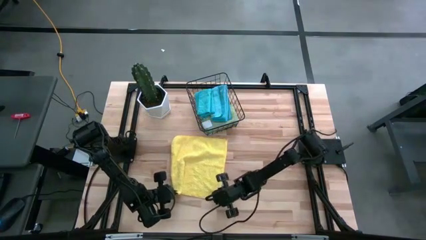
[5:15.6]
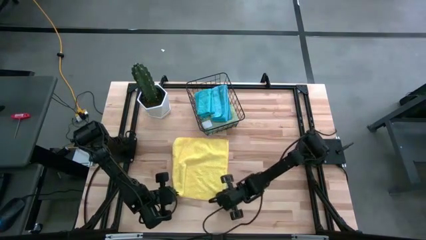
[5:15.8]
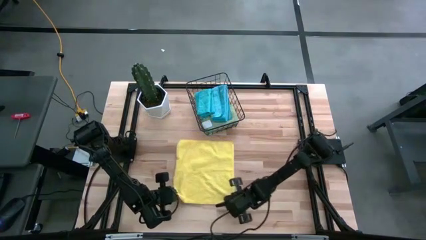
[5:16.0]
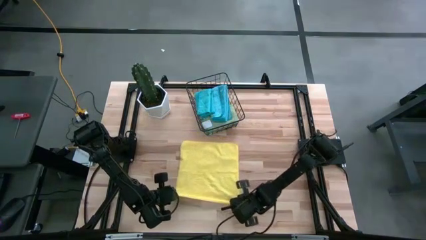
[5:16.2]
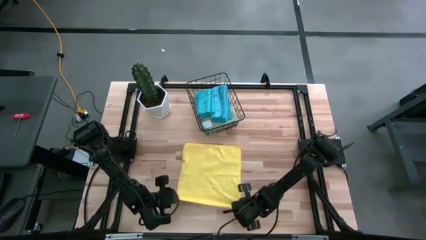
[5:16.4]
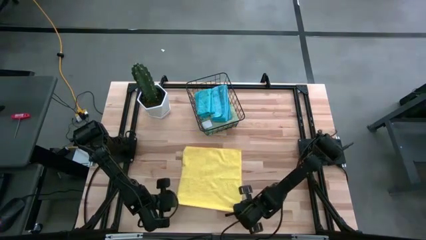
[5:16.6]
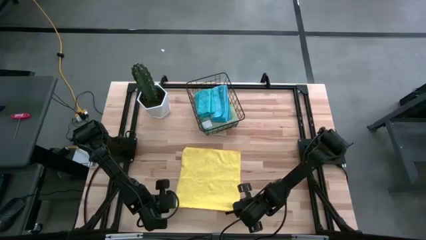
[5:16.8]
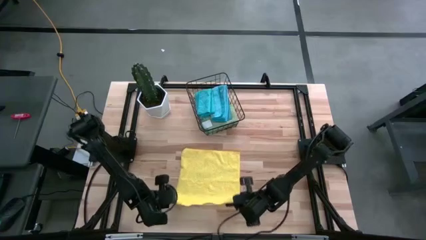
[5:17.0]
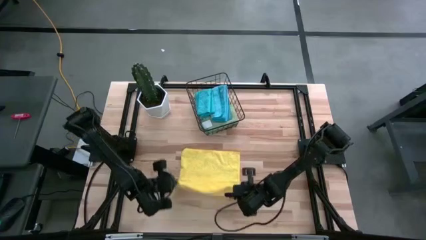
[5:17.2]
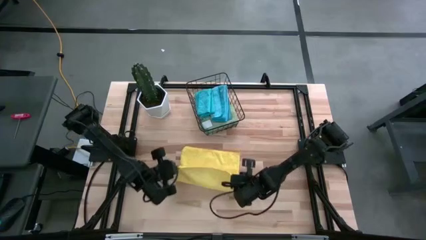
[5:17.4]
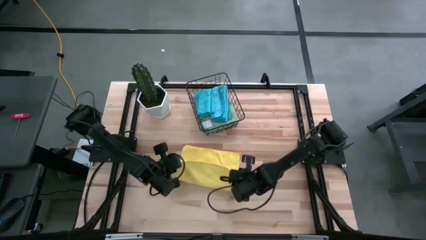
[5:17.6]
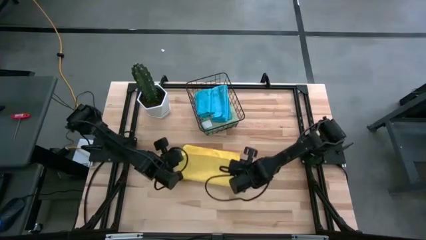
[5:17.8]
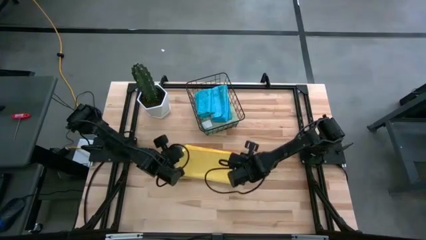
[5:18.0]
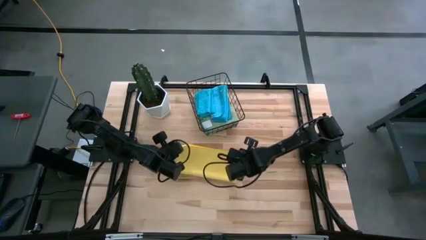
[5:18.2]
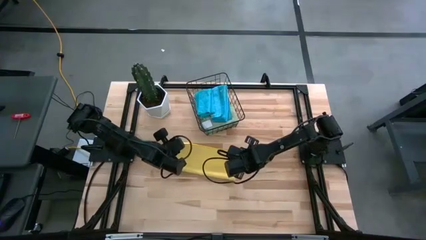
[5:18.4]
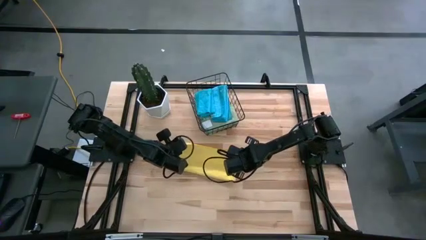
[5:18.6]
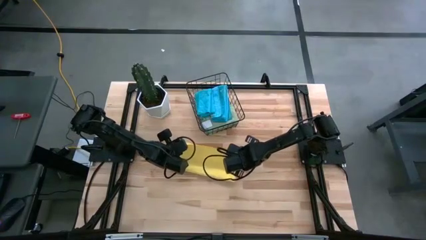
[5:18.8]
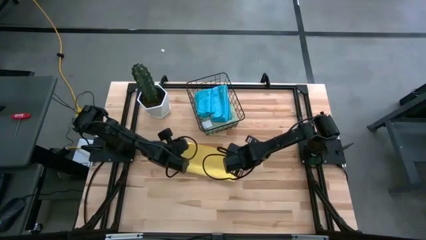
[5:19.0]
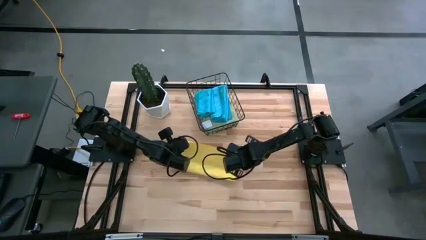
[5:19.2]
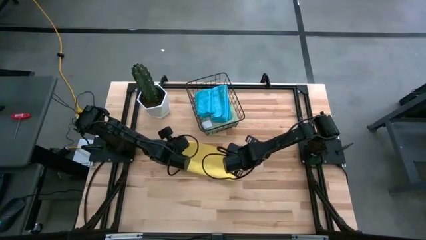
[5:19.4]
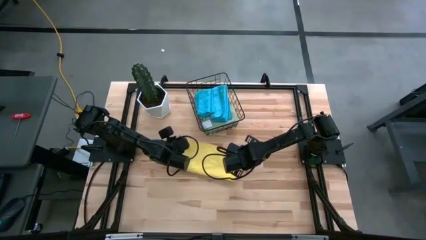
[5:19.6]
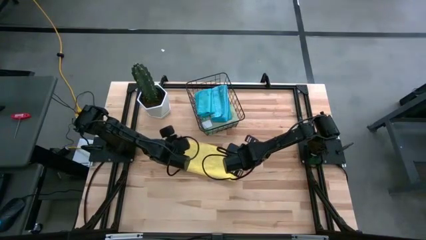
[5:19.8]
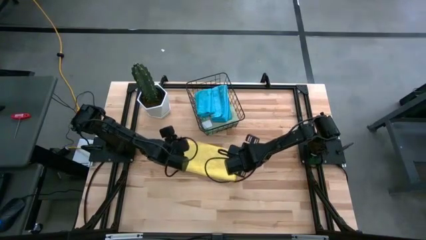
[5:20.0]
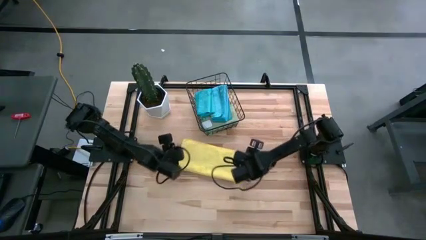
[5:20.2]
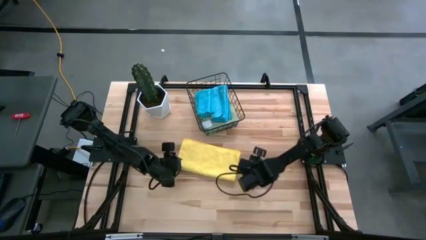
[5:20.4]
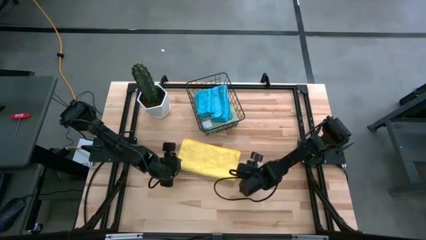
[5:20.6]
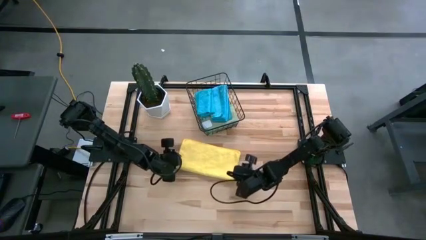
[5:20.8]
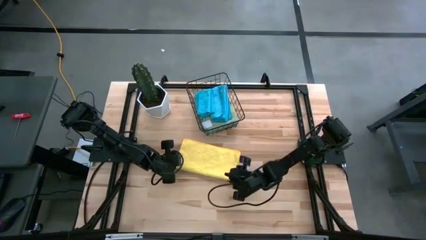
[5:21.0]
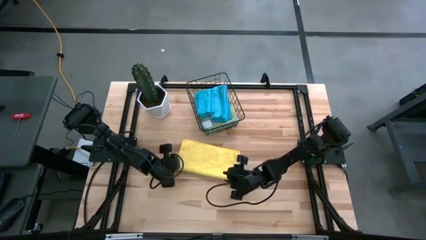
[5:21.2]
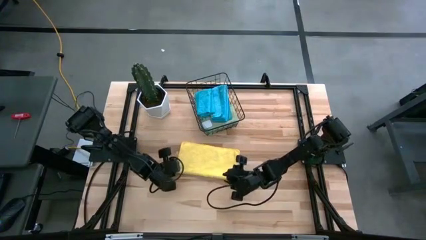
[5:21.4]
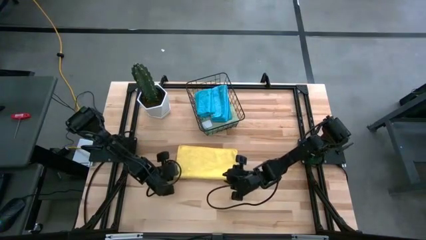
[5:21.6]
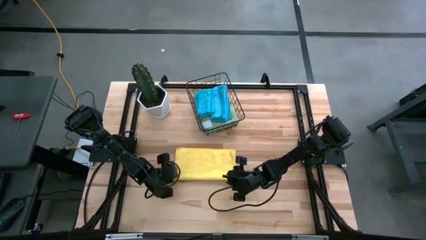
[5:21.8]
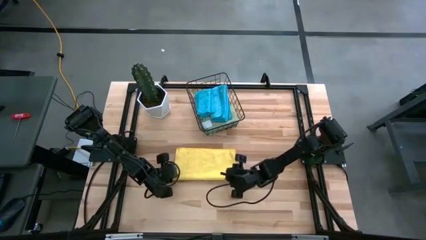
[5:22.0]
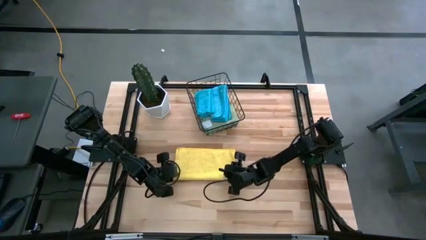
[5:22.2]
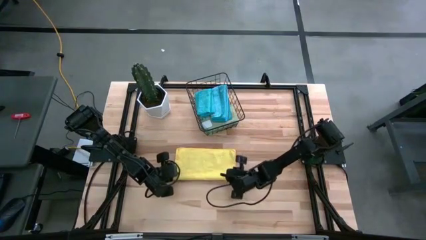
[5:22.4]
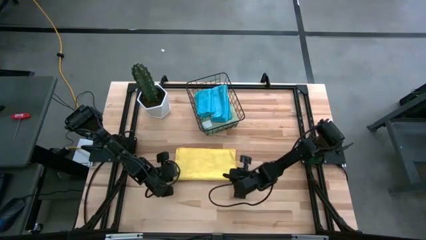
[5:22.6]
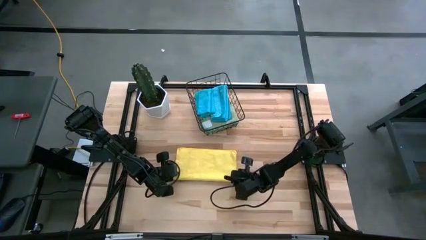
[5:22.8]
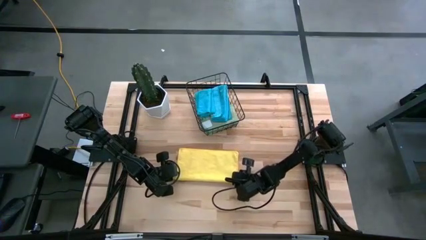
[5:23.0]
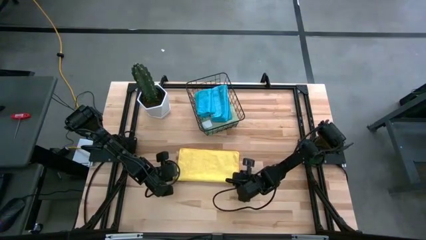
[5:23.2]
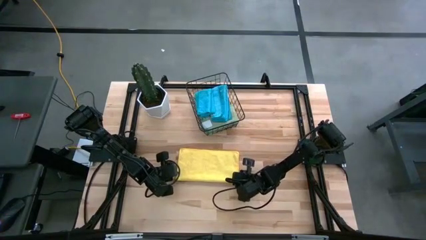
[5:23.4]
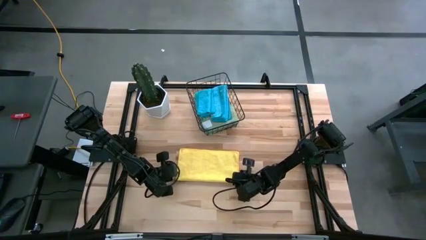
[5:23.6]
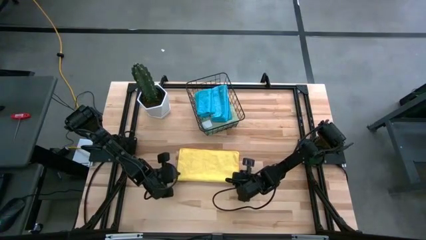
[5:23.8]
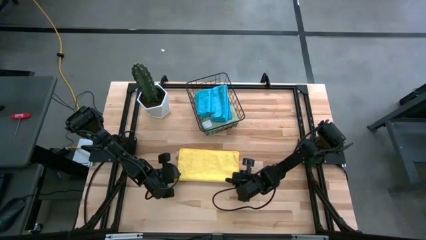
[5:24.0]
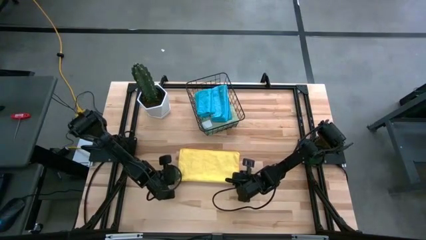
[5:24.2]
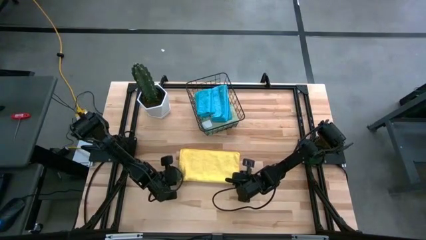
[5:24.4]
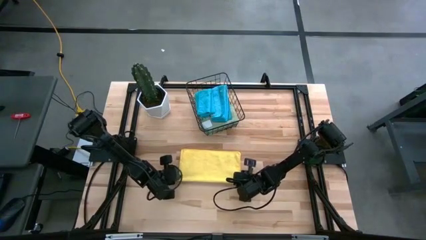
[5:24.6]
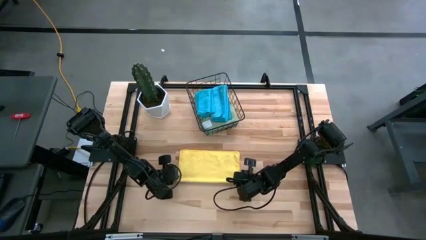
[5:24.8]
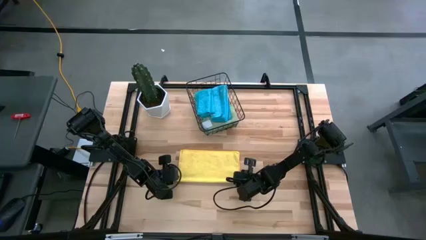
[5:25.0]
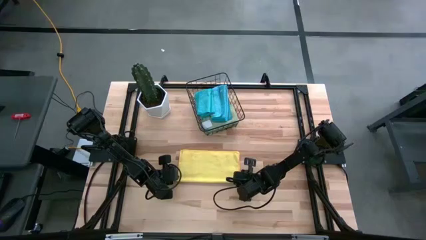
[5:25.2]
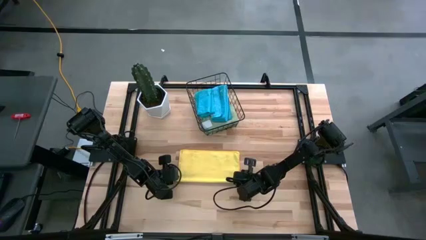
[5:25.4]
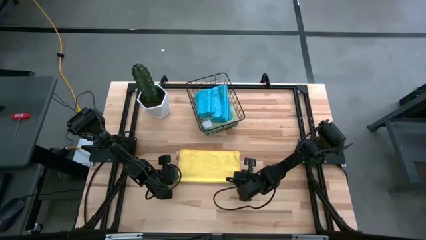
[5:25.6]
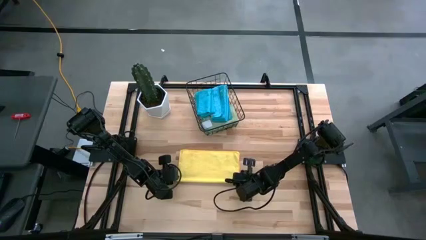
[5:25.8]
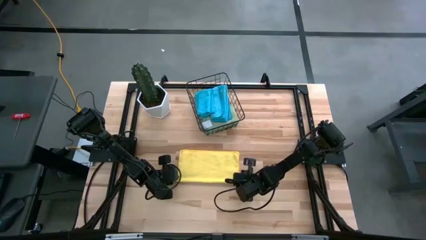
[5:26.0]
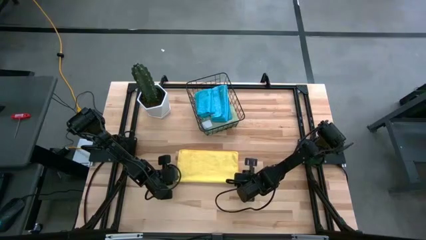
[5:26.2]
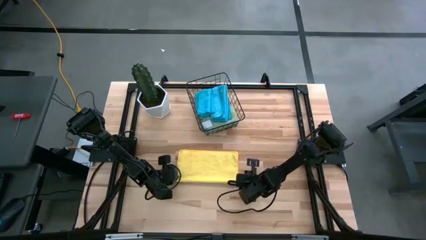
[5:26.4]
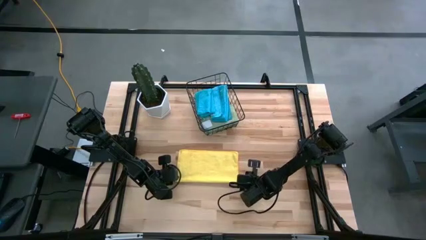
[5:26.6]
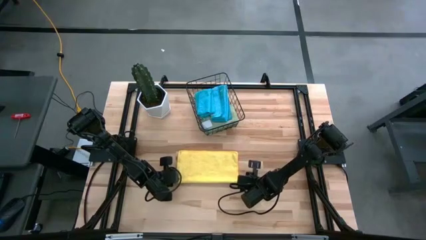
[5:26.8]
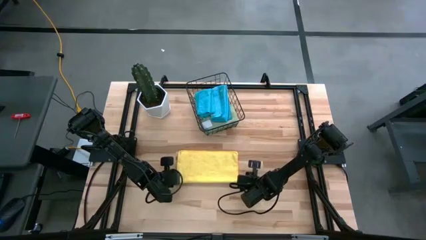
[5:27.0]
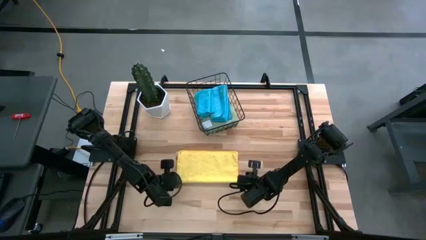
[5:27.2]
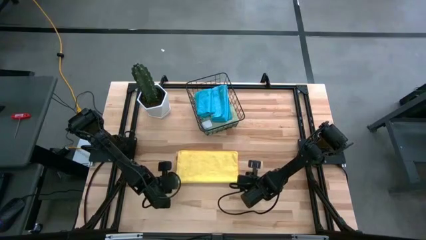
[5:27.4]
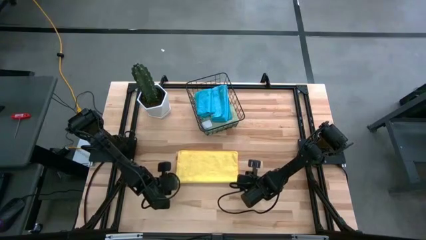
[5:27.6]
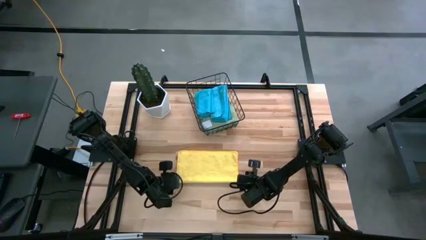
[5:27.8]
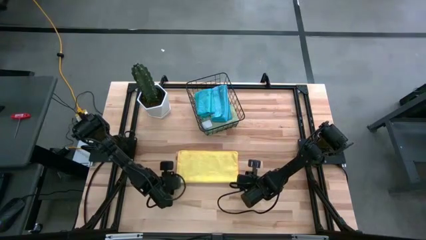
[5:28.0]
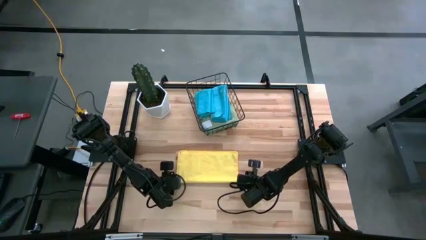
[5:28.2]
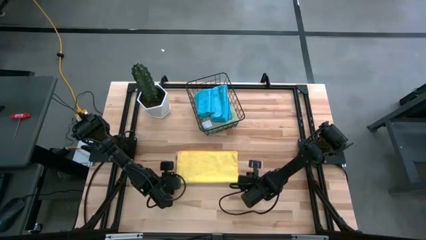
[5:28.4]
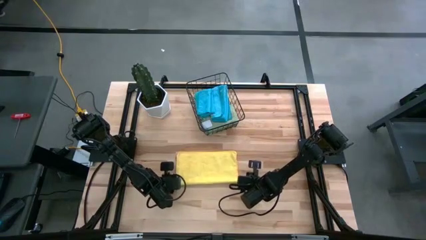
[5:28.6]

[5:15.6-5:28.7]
Task: Fold microfiber towels
Fold the yellow microfiber cloth

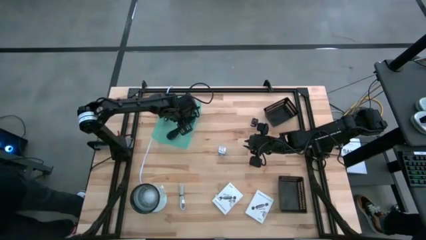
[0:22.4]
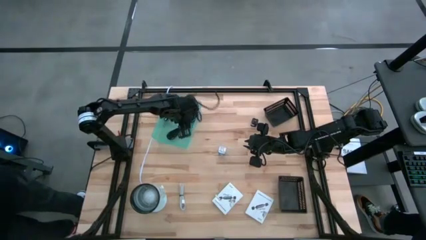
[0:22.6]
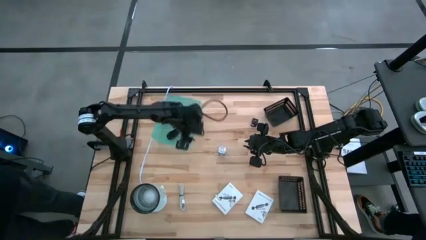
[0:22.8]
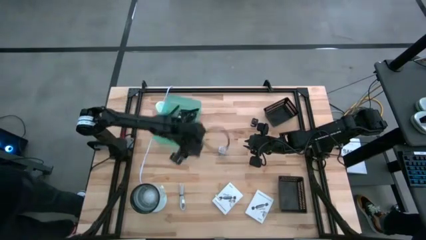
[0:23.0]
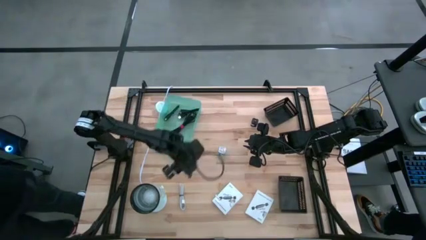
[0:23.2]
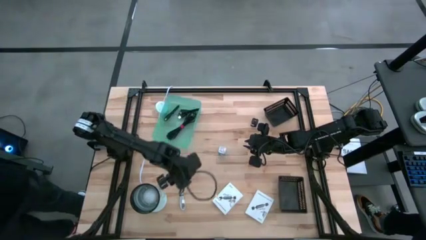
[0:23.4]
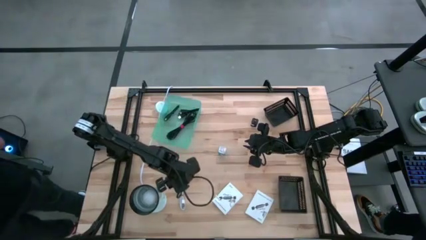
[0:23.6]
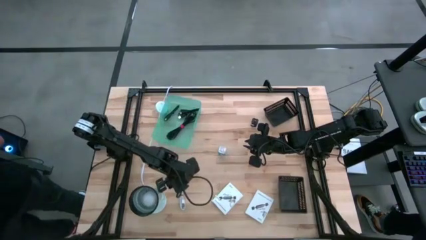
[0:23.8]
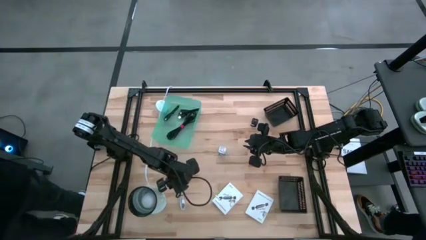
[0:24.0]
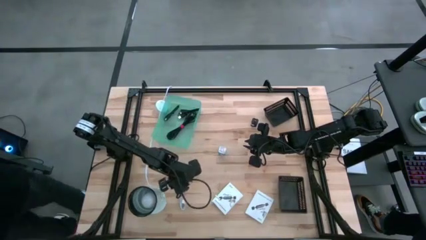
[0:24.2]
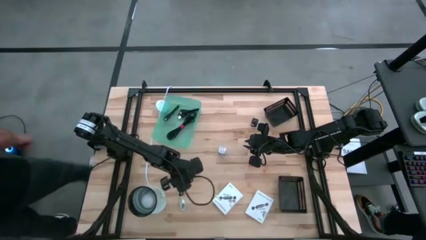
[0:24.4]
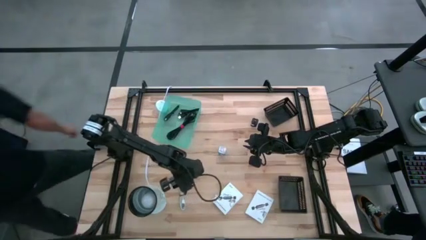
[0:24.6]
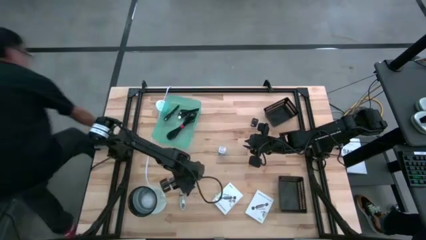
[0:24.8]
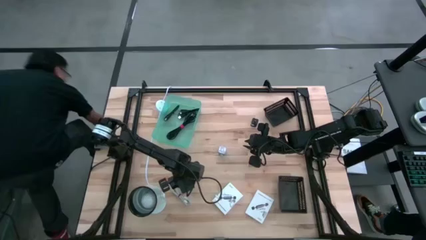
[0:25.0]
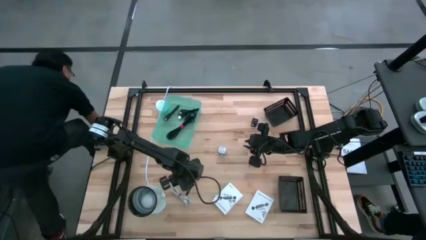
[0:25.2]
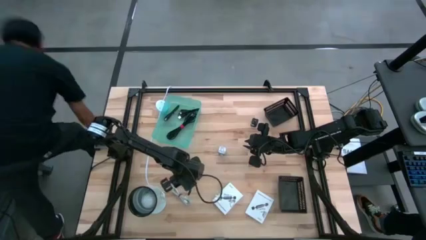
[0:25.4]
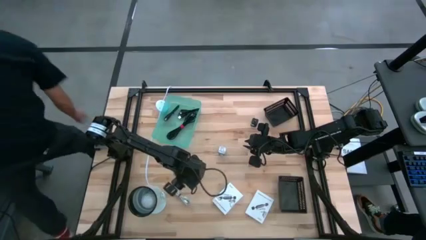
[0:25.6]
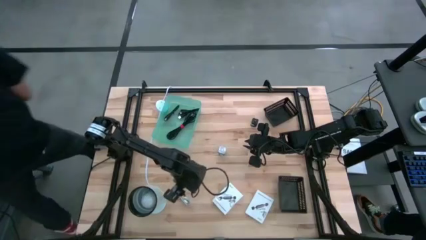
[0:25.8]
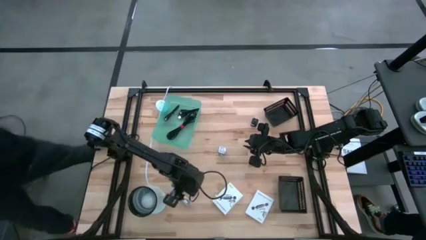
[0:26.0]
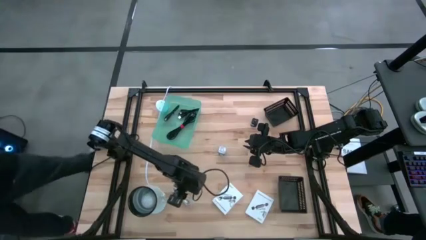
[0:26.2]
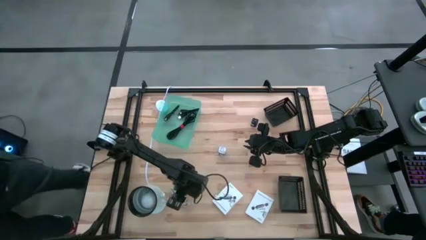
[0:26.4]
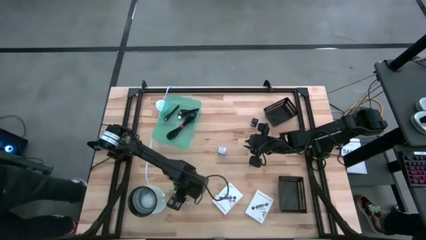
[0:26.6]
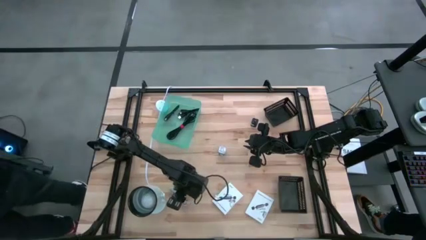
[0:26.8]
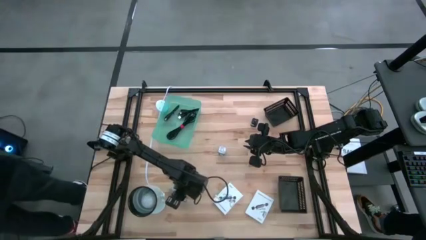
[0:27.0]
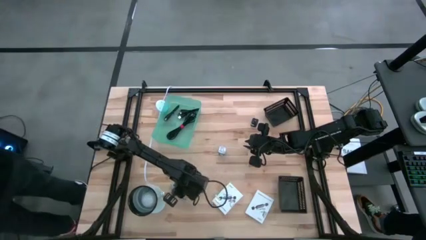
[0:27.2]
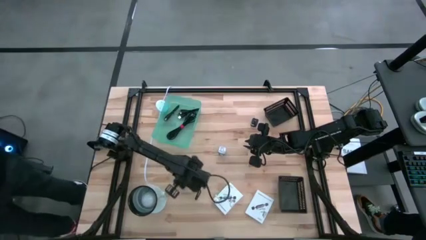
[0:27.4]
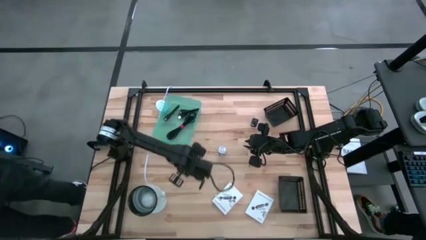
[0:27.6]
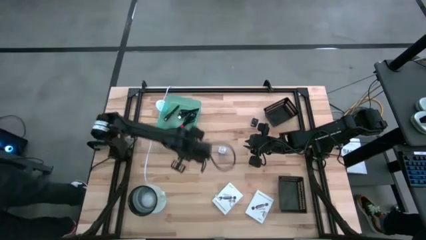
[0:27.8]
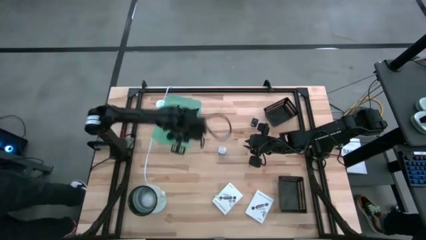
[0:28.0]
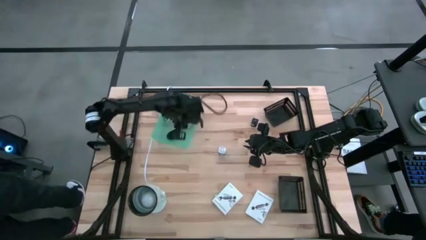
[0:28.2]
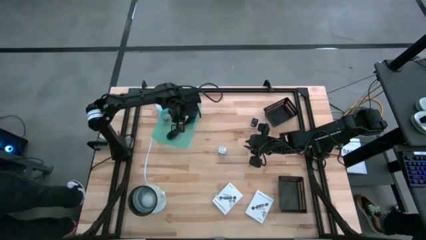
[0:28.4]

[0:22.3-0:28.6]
Task: Pick and place items into bin
Put the white charger cable into the green bin
